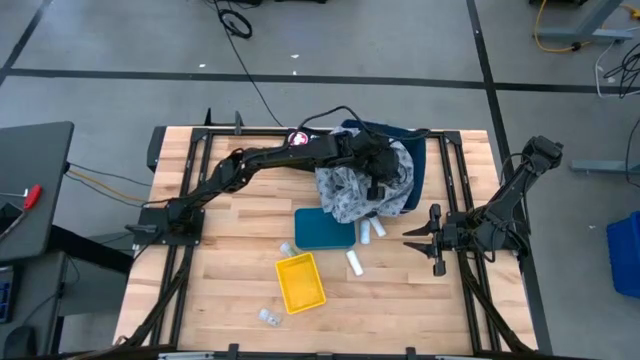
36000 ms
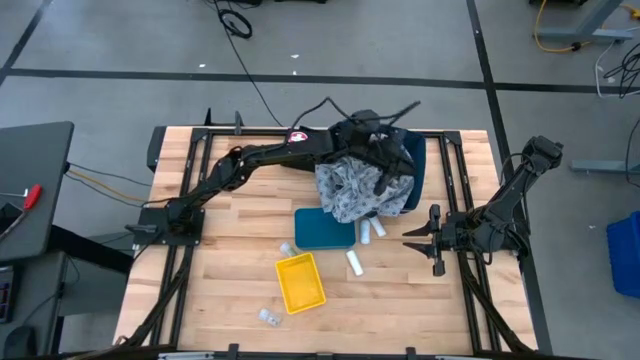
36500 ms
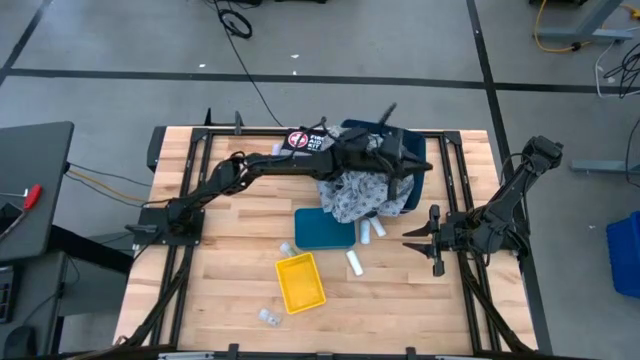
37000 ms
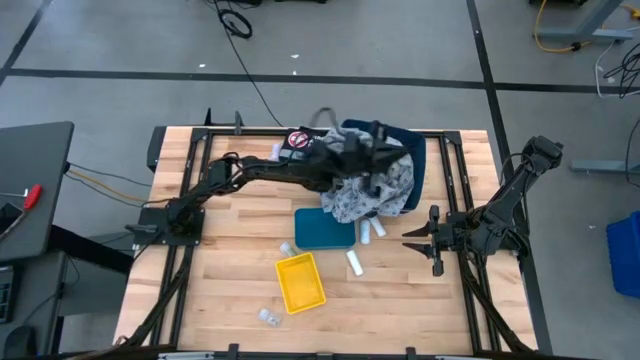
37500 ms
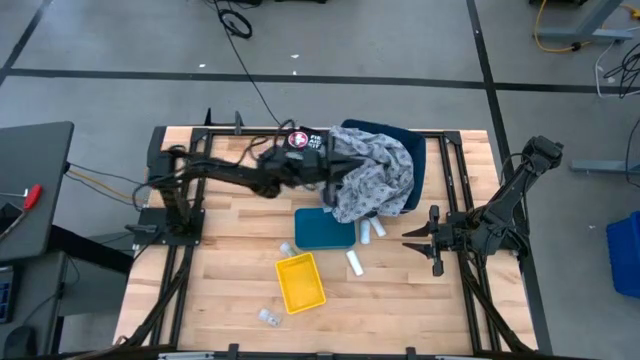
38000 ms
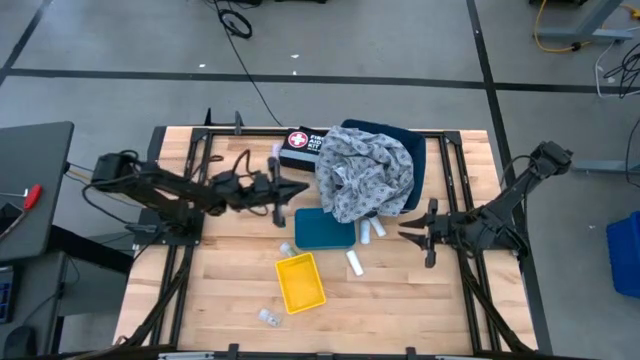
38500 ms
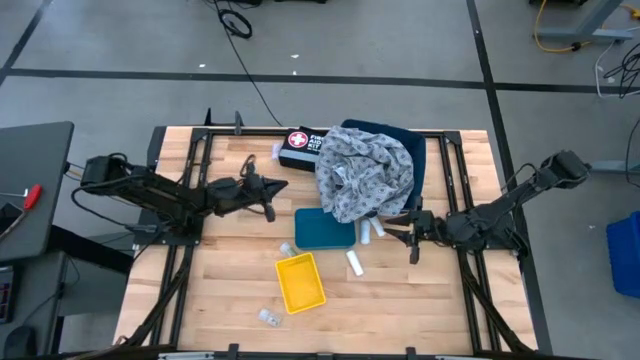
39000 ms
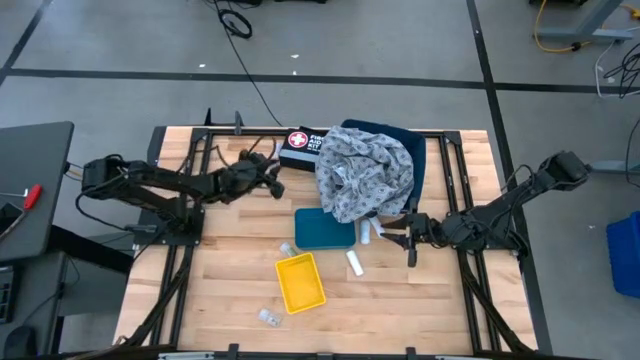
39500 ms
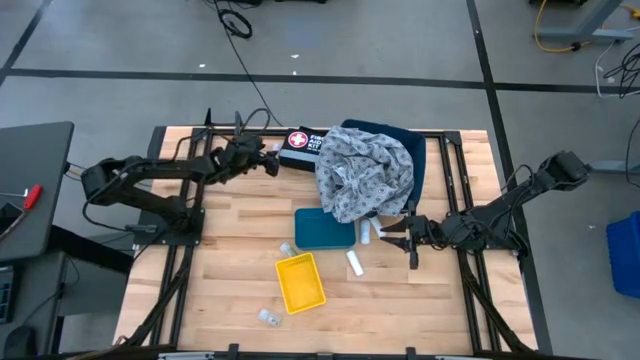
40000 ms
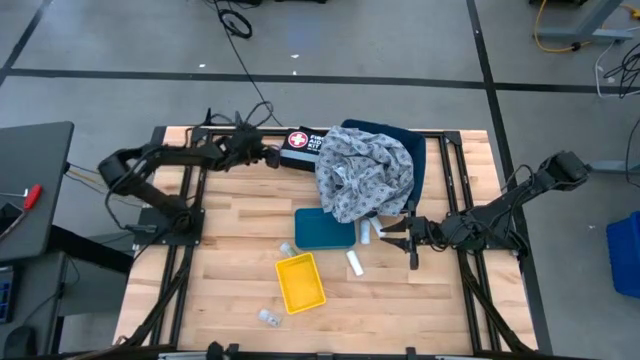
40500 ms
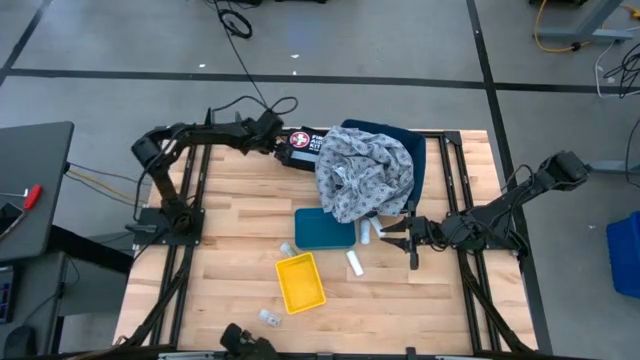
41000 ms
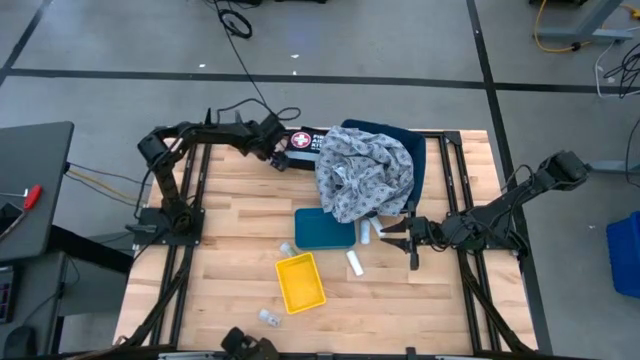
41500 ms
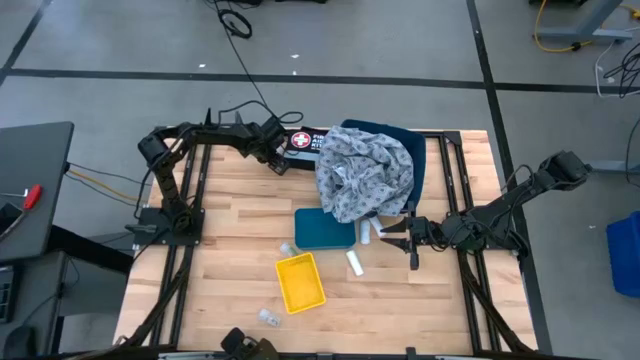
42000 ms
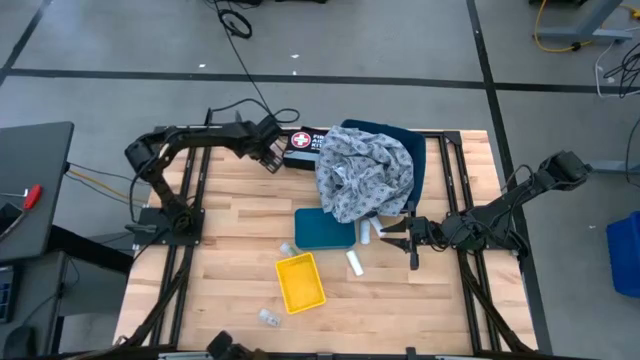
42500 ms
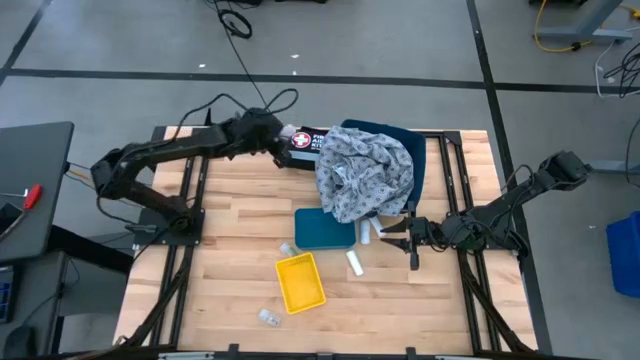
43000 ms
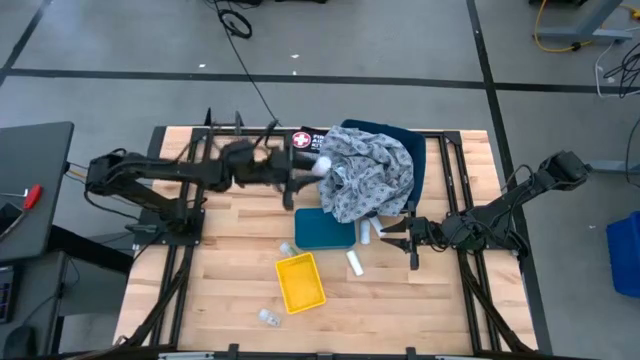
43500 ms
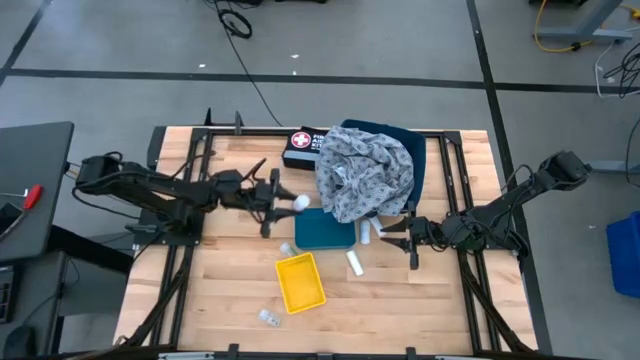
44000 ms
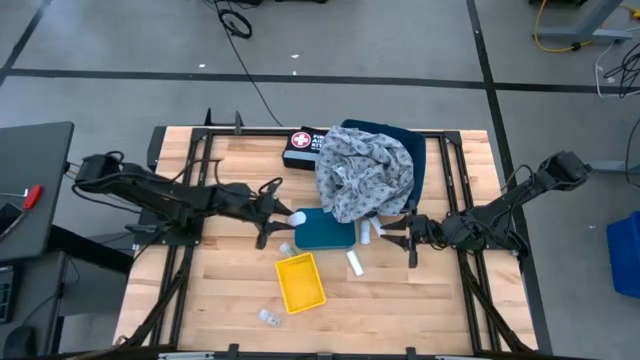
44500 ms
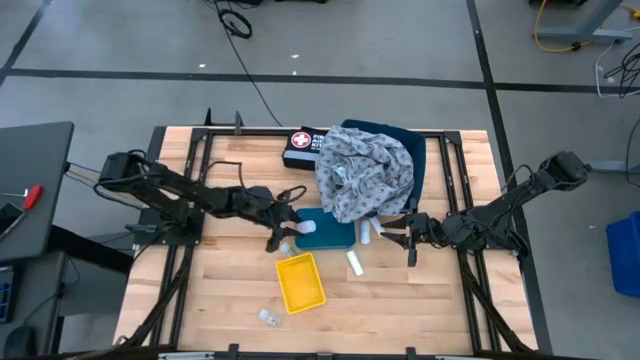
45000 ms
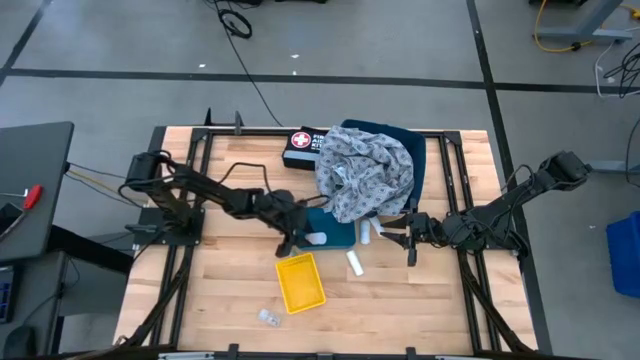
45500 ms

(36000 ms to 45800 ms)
Task: Pick & place medical supplies in basket/bin
Put the white pill bottle into the blue bin

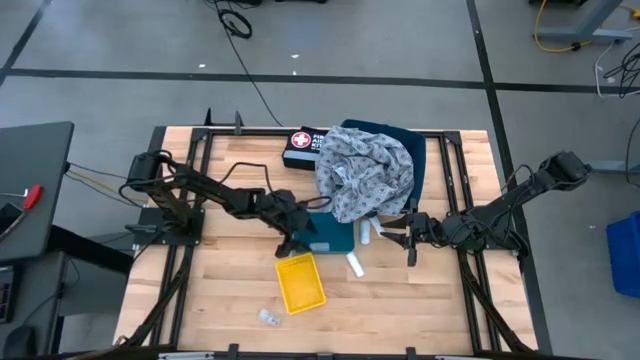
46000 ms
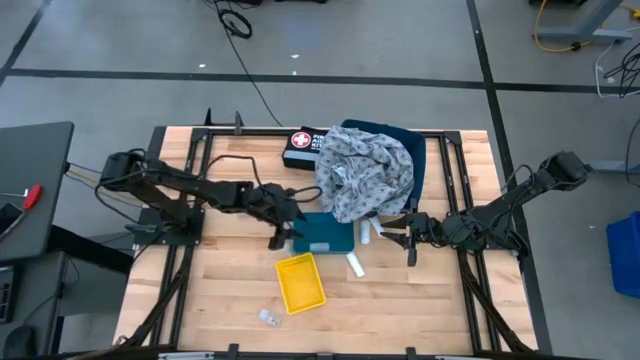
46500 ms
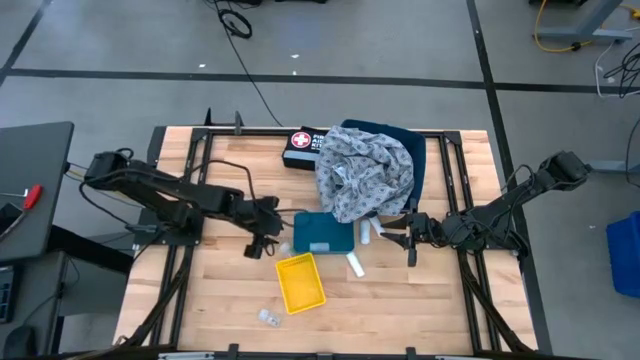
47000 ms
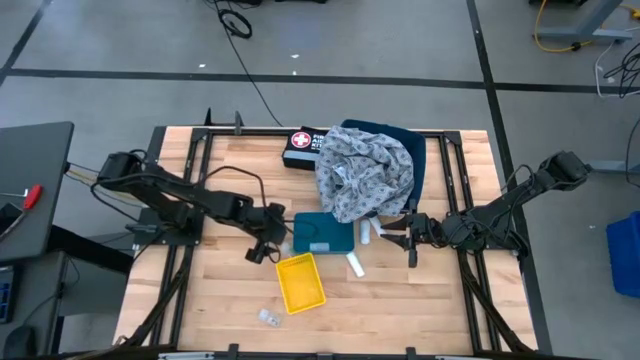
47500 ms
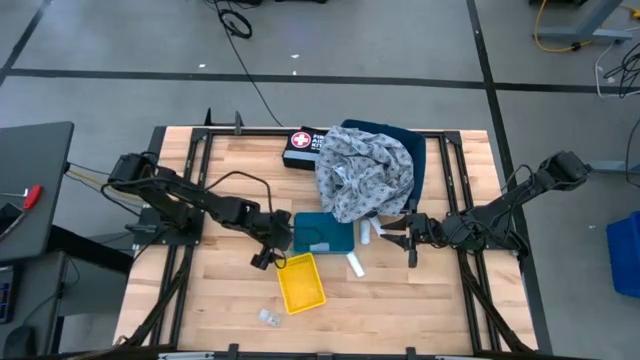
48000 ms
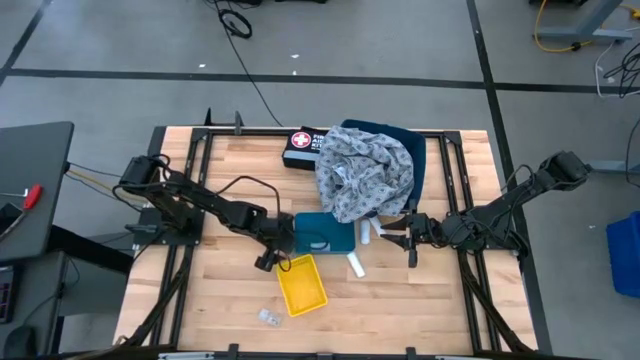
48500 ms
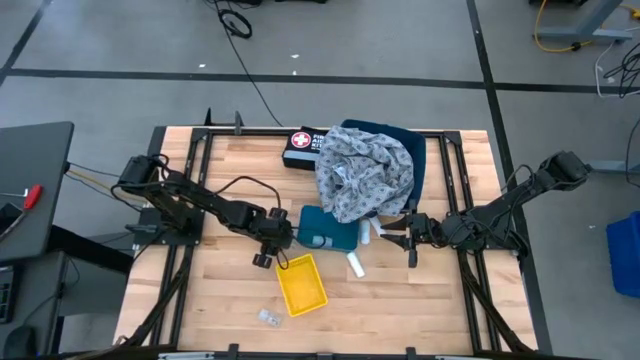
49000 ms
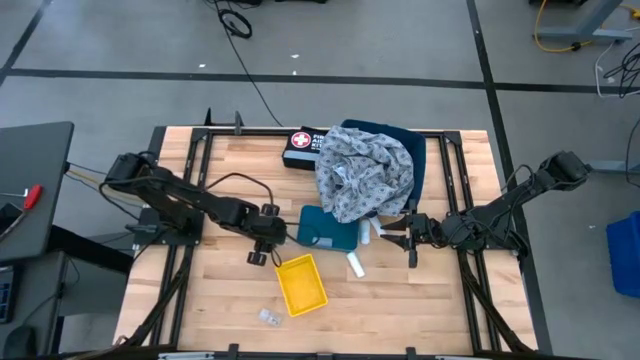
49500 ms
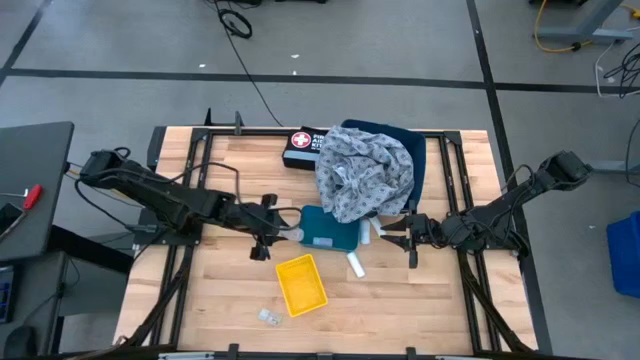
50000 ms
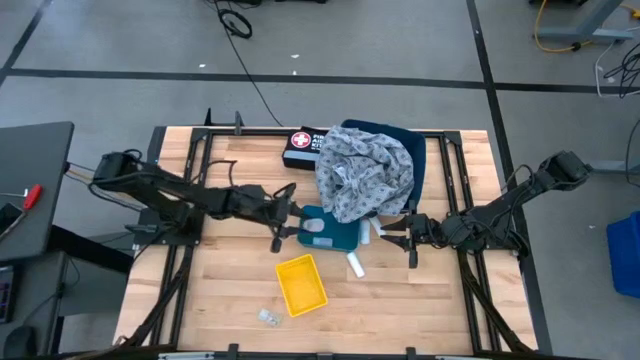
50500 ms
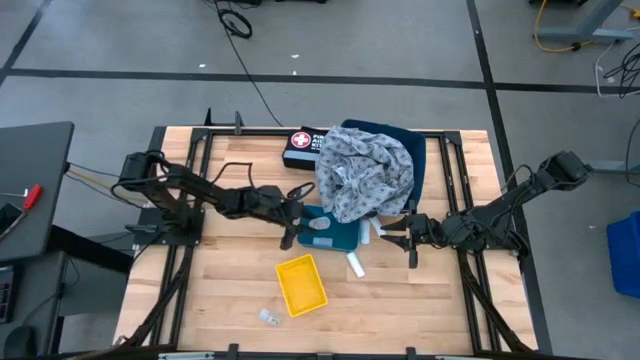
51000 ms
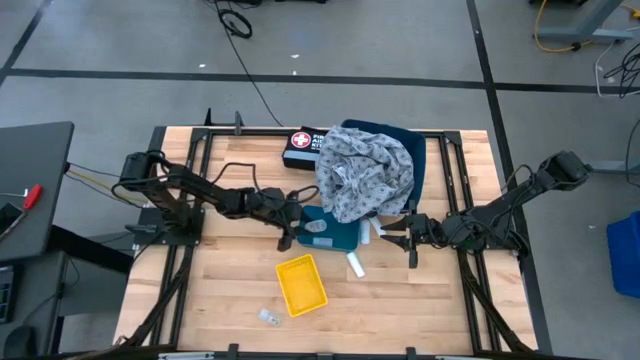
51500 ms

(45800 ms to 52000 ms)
Put the top transparent pill bottle into the blue bin

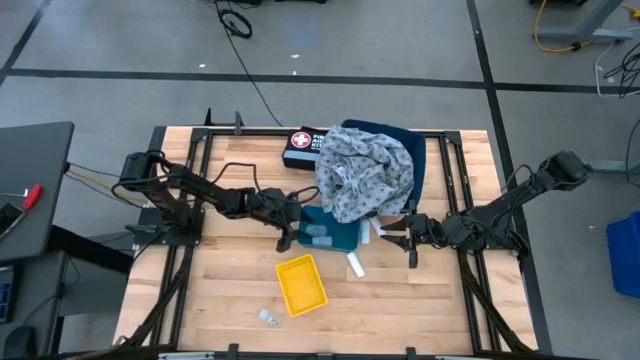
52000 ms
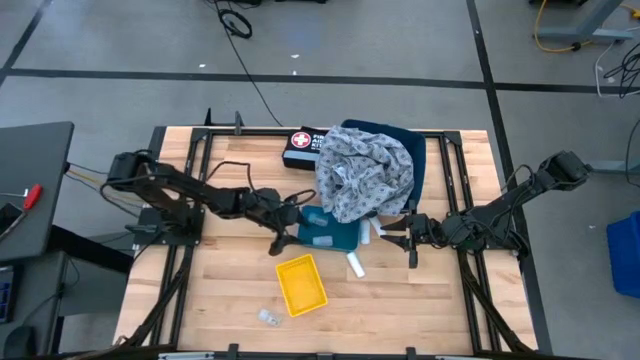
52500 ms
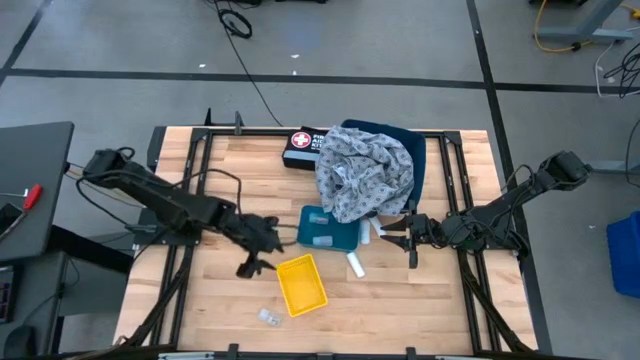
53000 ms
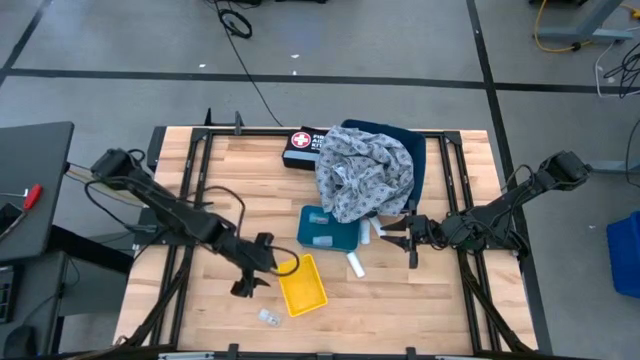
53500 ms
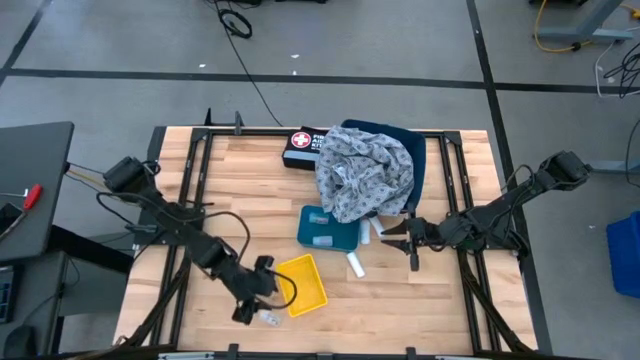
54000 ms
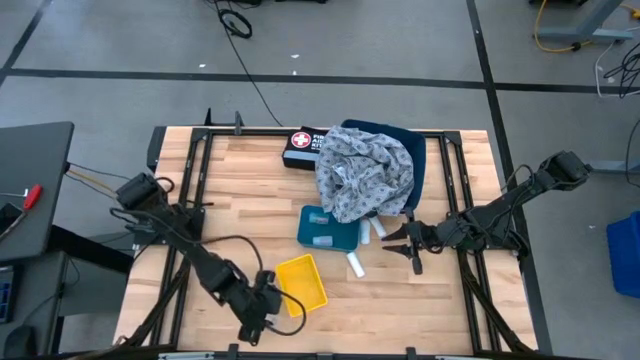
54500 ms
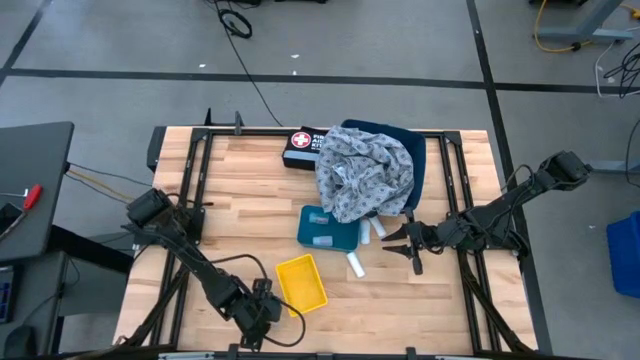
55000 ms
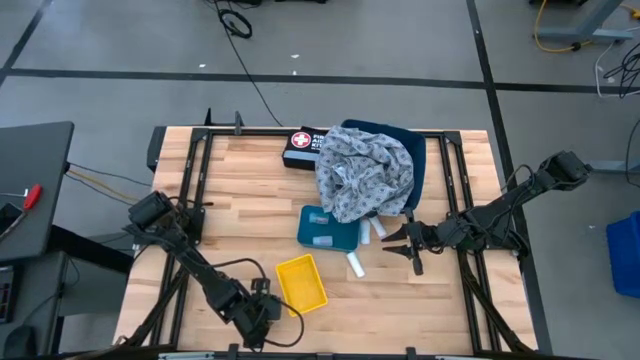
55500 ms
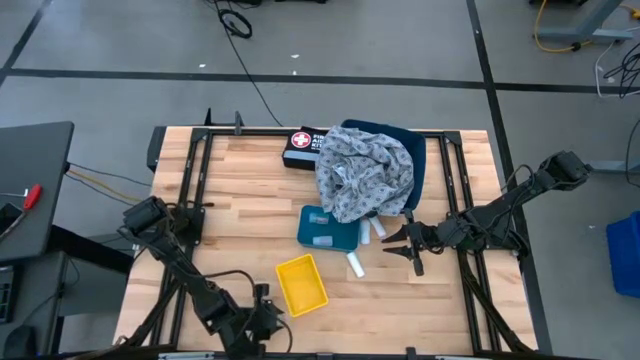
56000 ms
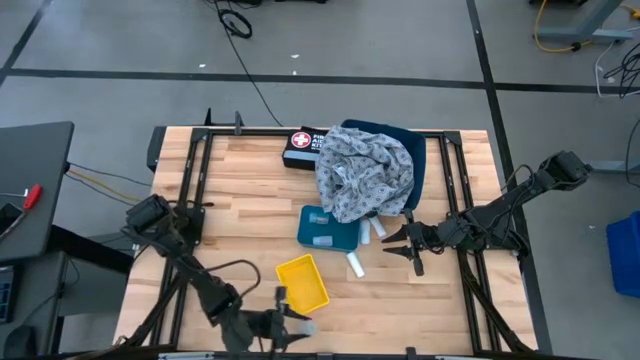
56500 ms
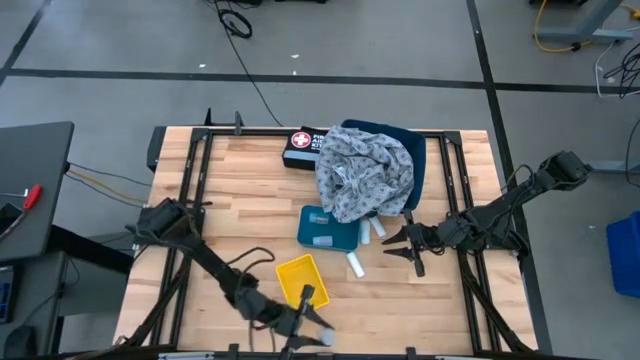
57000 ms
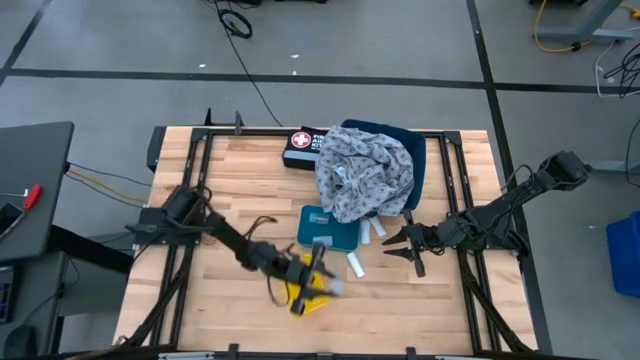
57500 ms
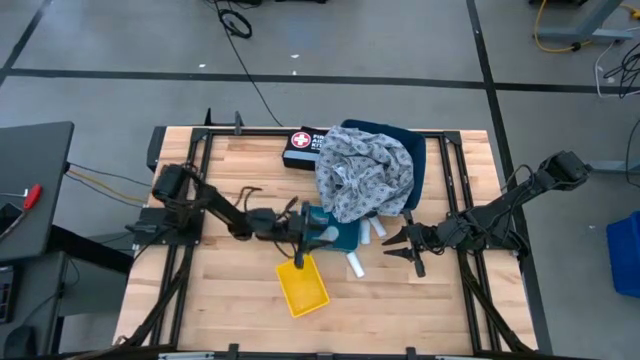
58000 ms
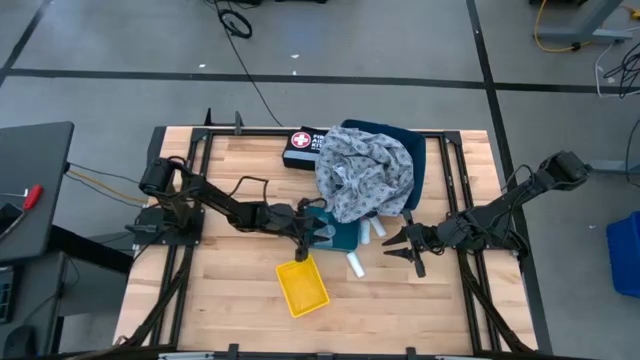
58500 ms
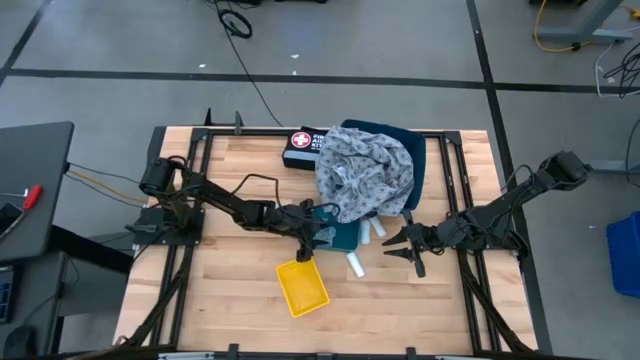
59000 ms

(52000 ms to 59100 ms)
Put the transparent pill bottle into the blue bin
